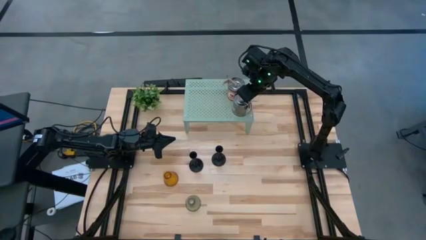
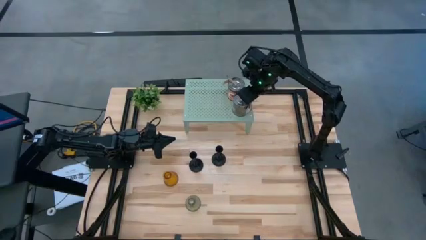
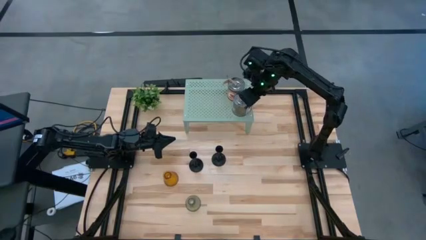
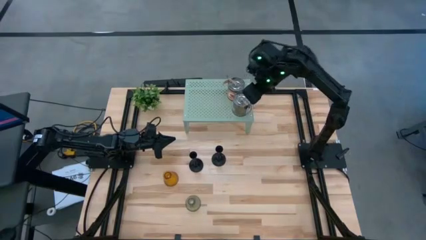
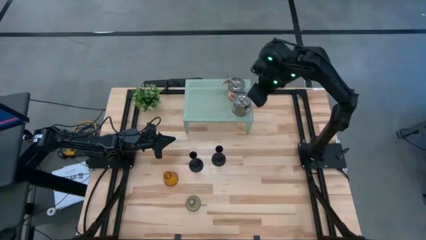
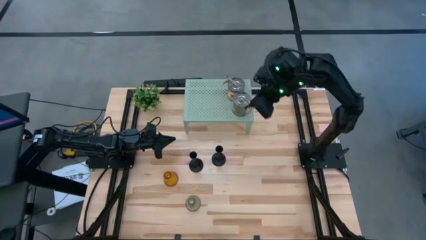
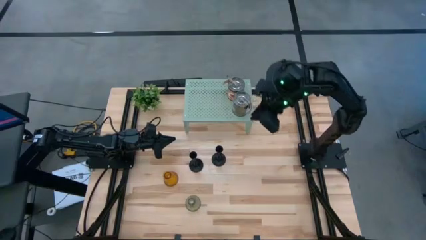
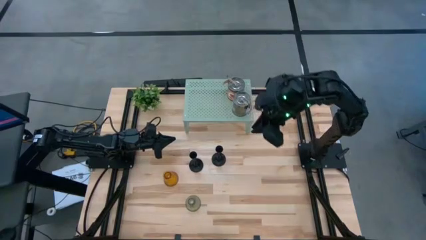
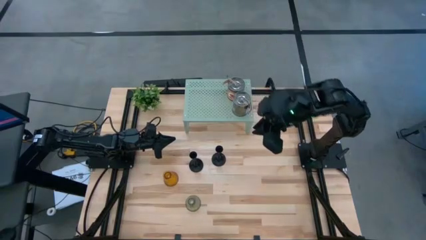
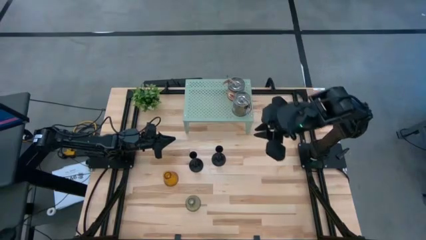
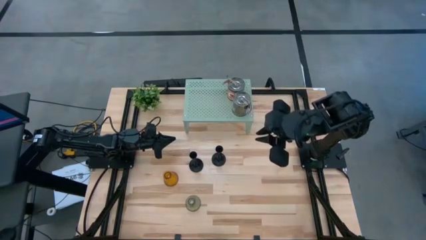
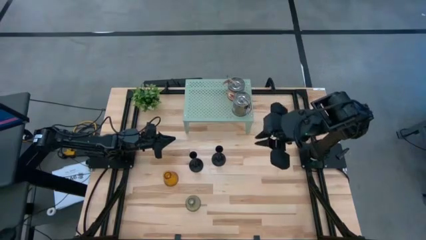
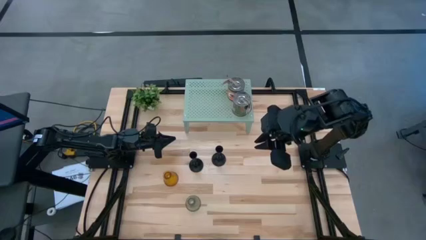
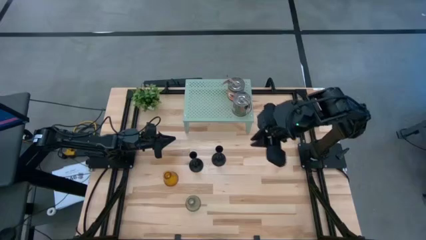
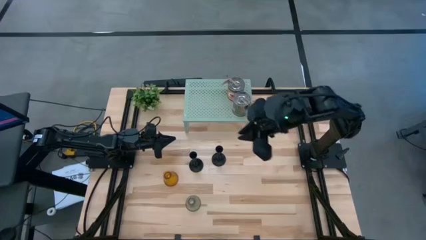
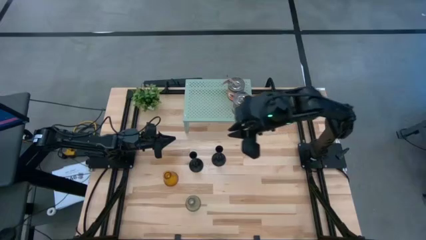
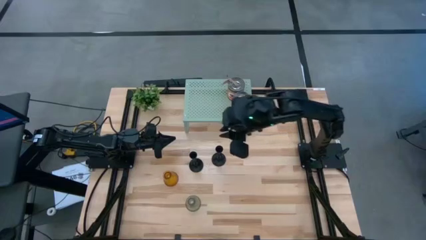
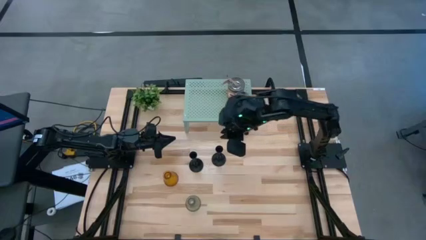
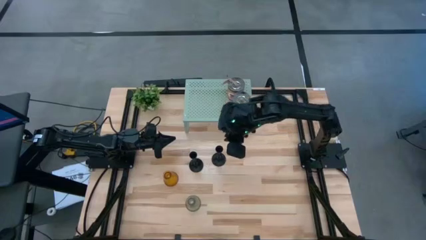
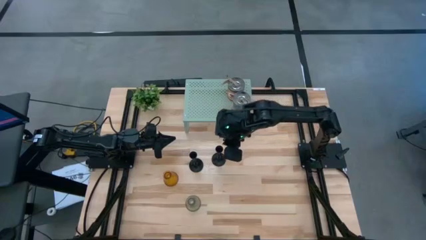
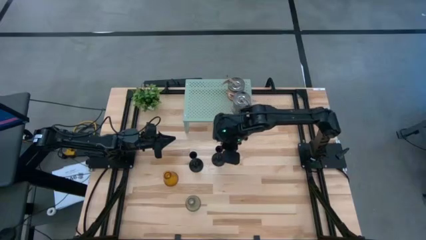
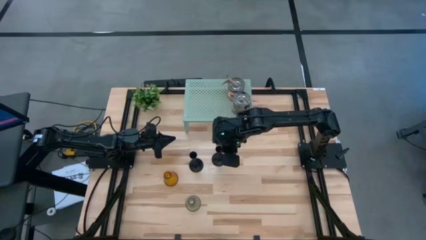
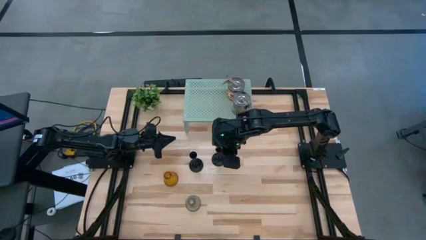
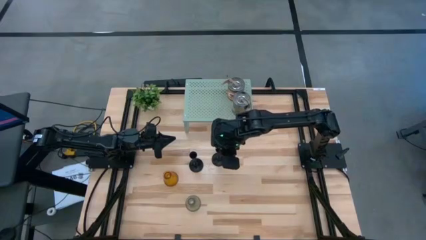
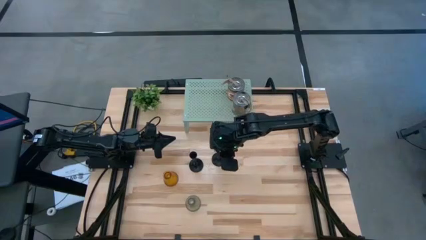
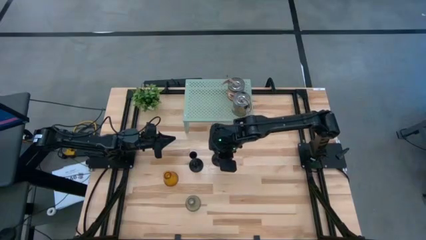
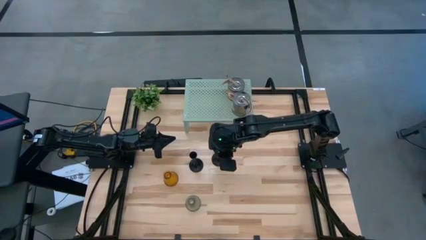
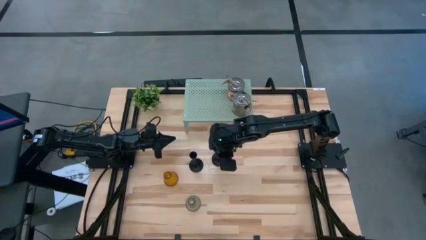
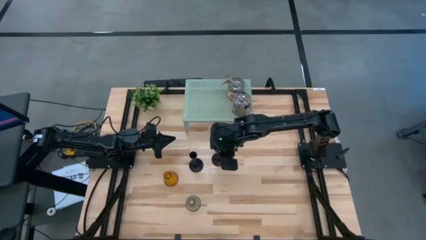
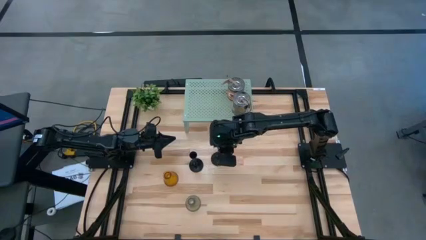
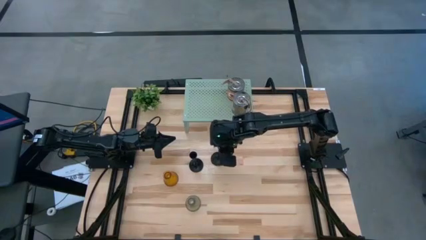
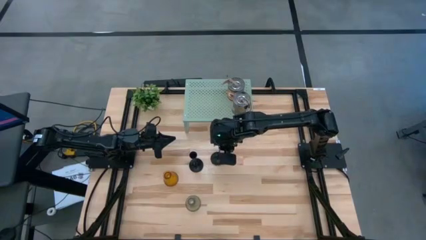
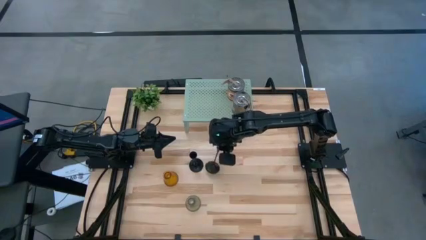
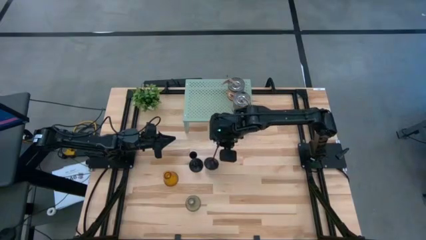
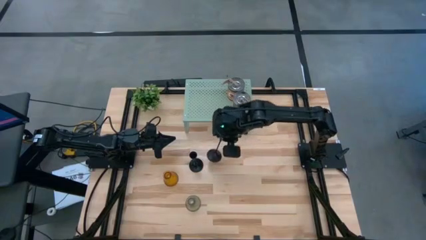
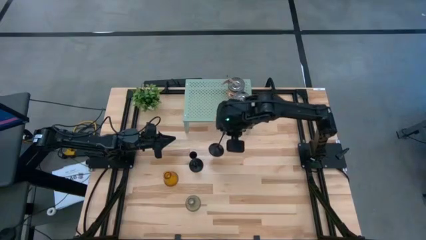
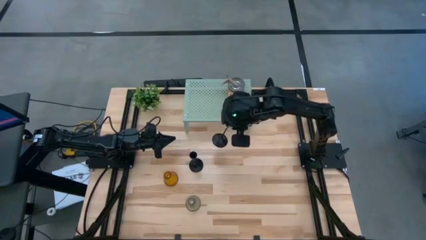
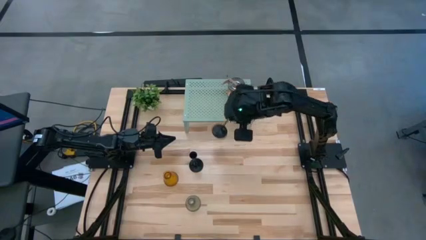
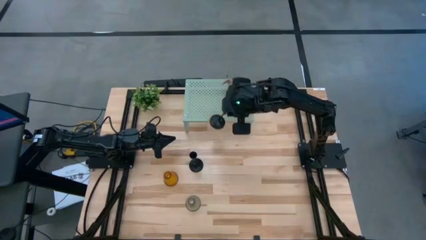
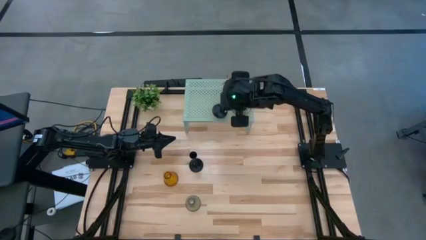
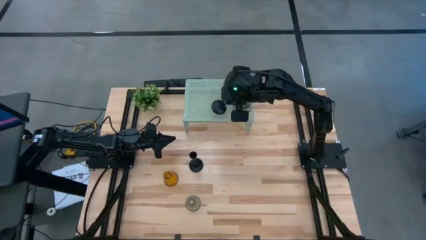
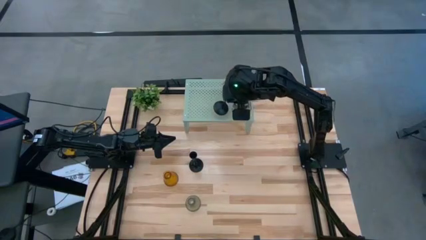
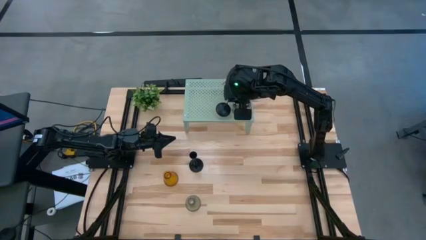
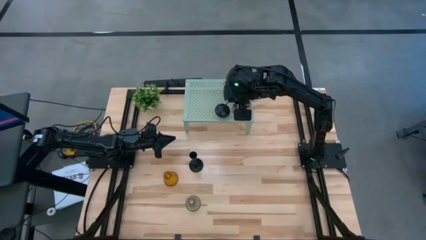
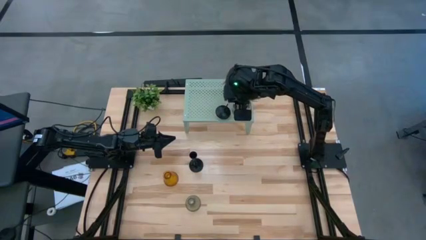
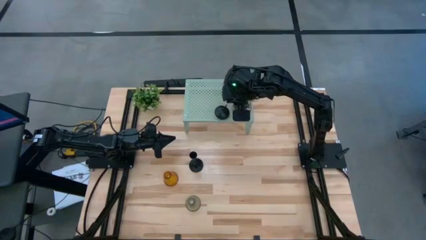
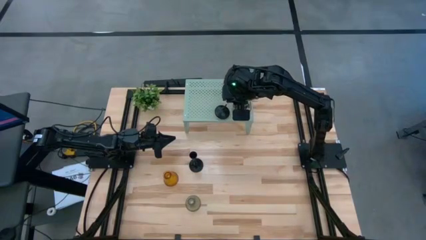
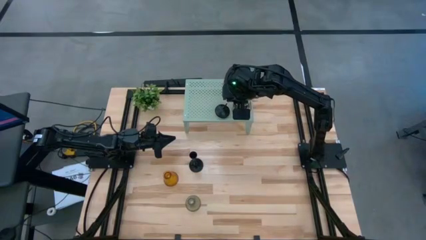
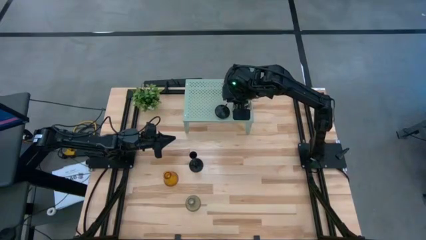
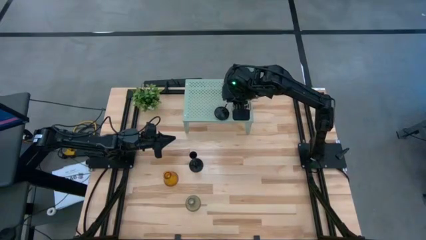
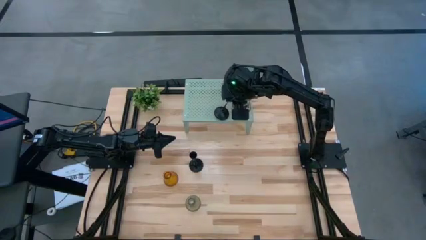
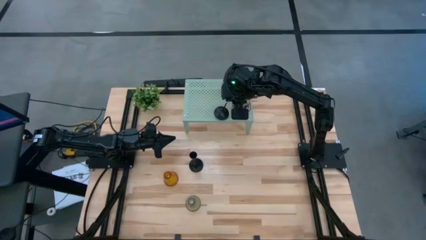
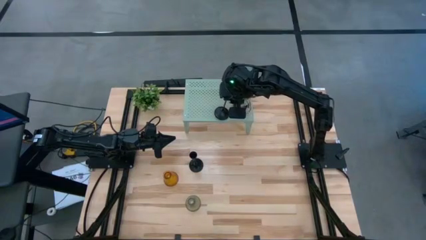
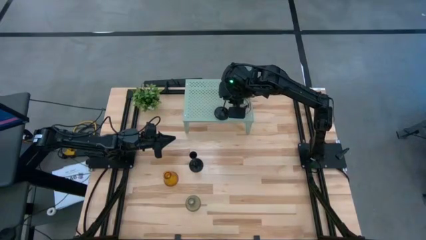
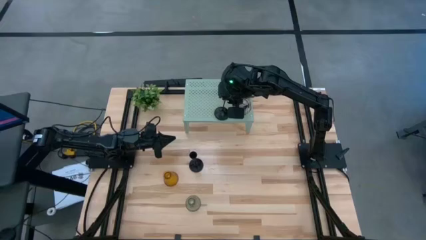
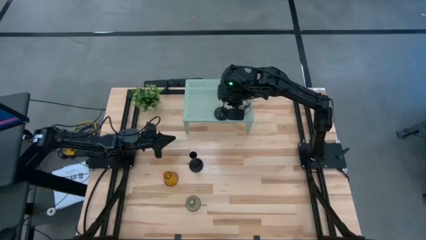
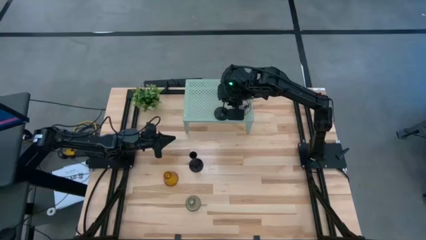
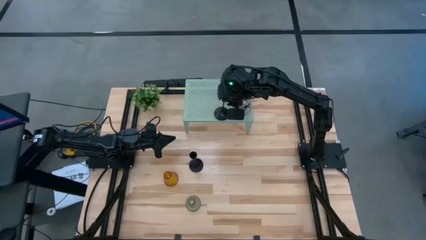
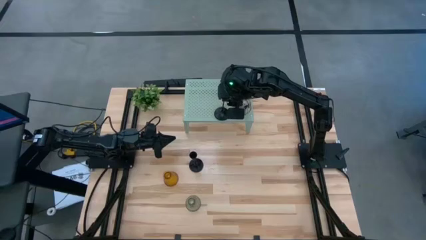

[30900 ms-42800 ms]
Task: Pick & Place candle stick holders
Put the right black candle holder on the shelf
